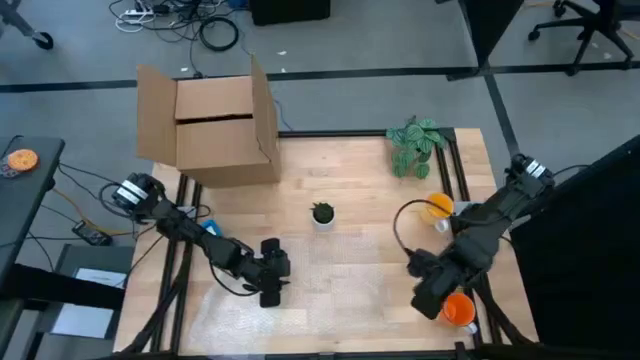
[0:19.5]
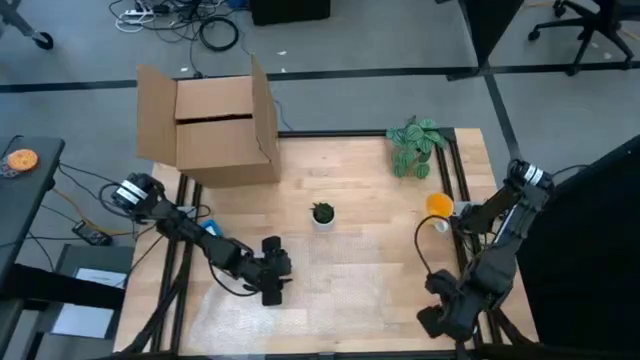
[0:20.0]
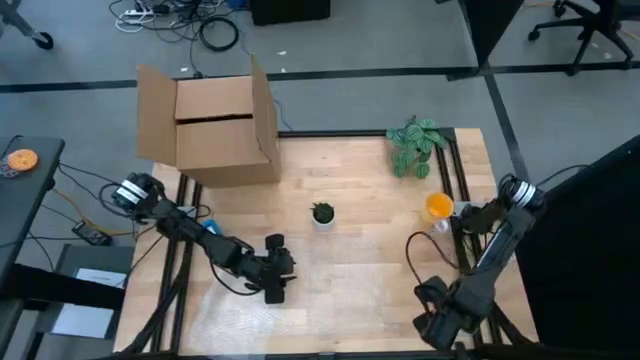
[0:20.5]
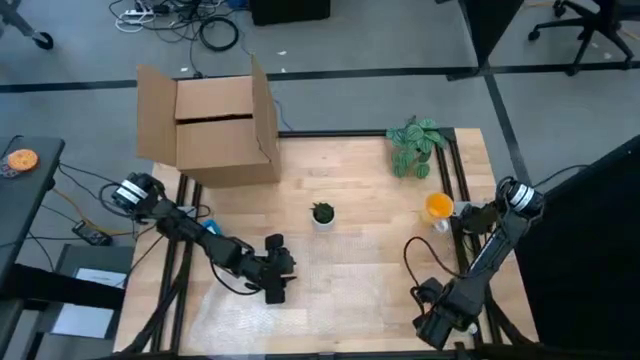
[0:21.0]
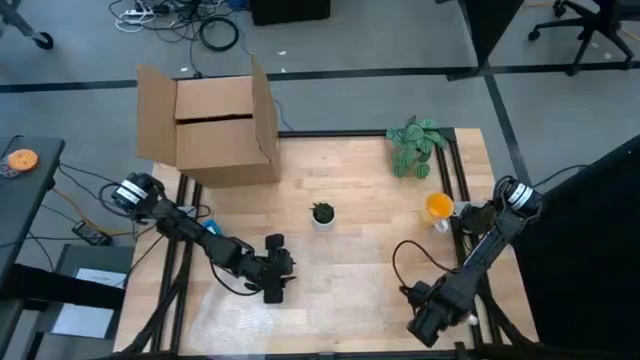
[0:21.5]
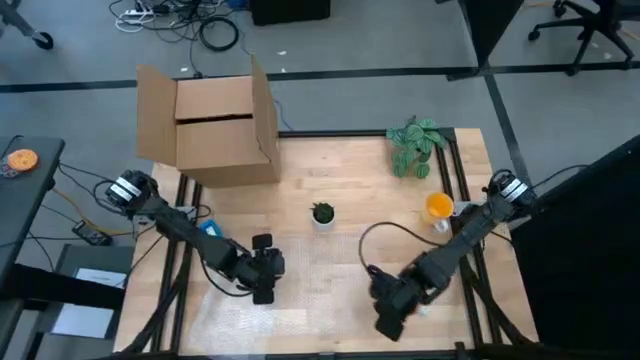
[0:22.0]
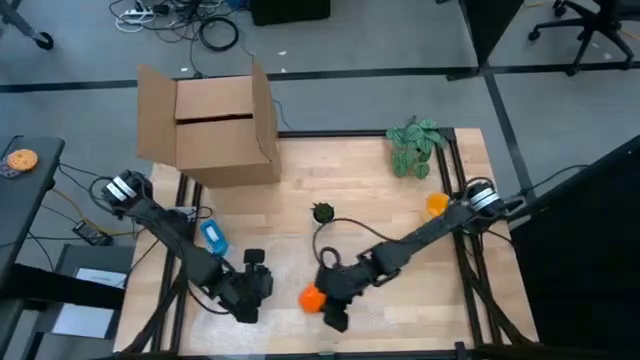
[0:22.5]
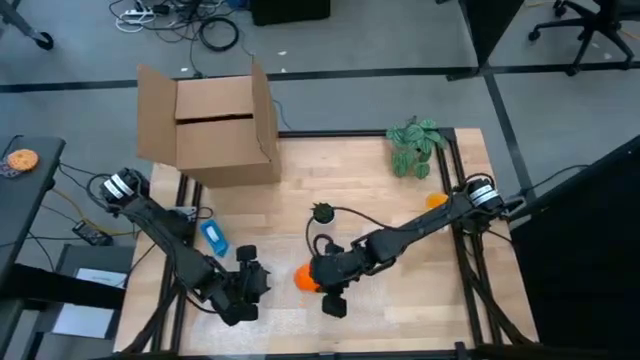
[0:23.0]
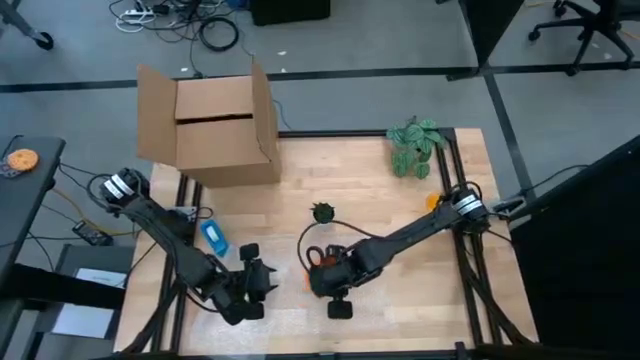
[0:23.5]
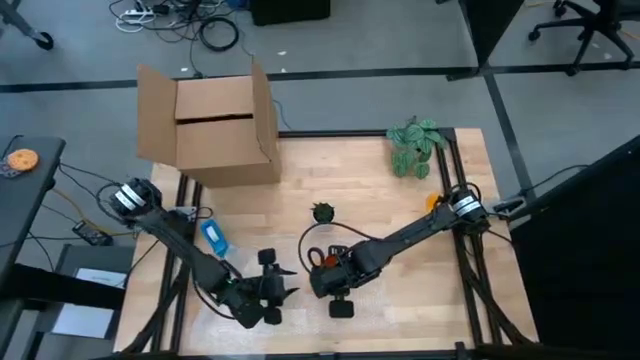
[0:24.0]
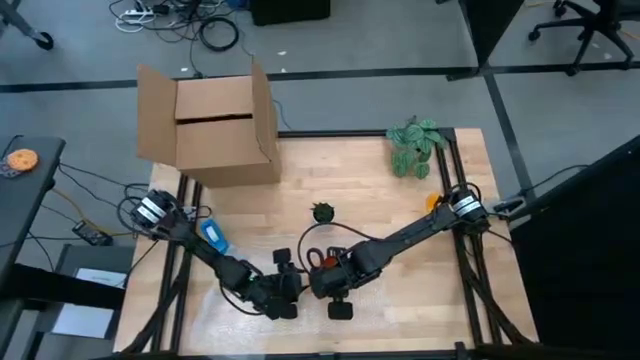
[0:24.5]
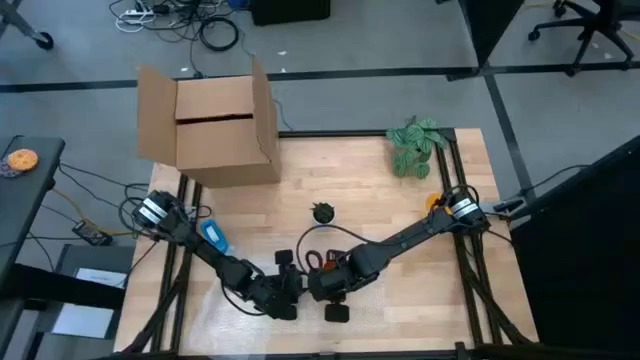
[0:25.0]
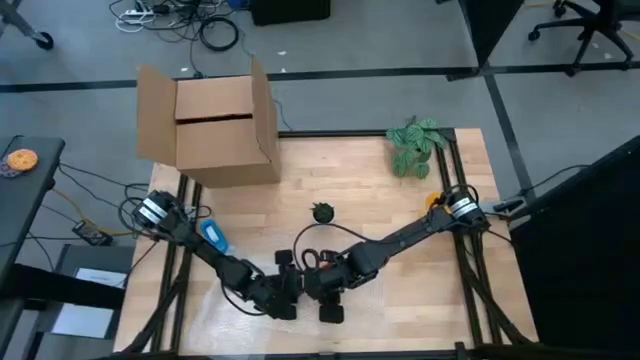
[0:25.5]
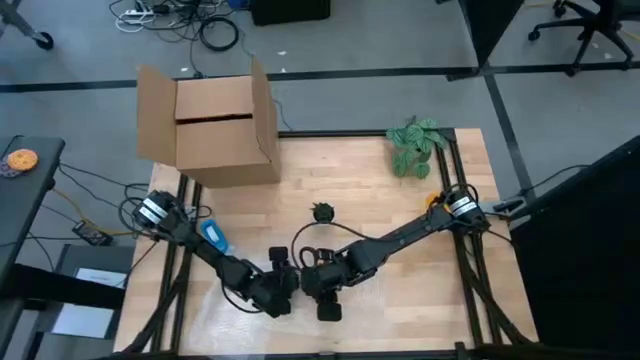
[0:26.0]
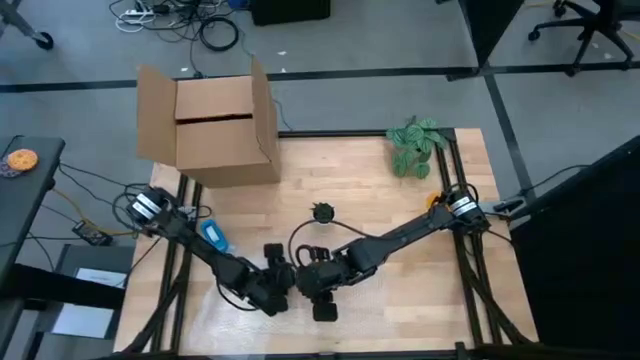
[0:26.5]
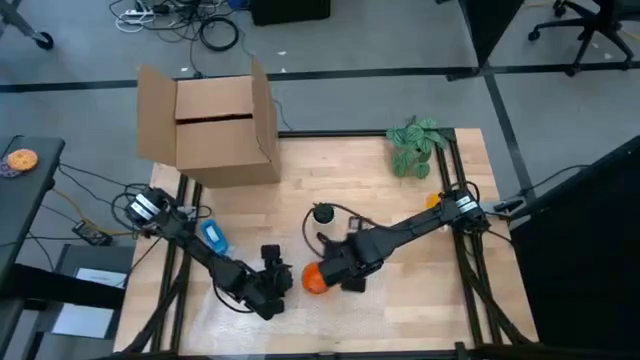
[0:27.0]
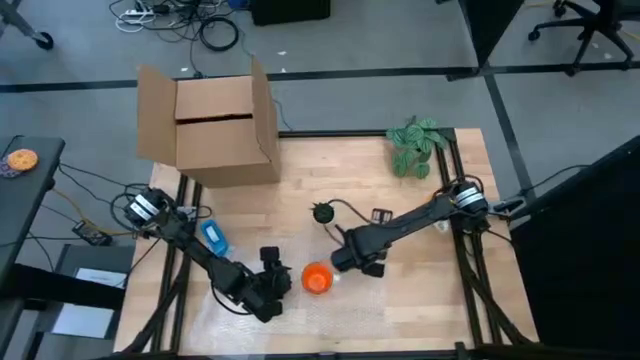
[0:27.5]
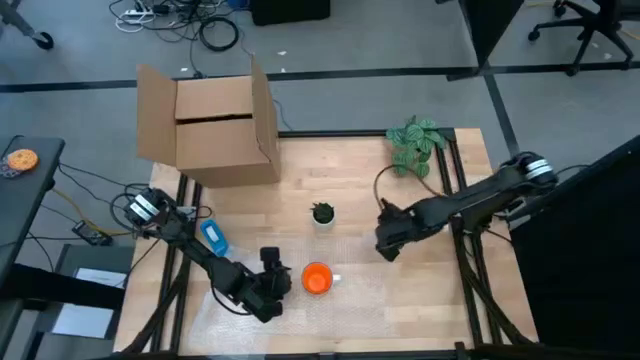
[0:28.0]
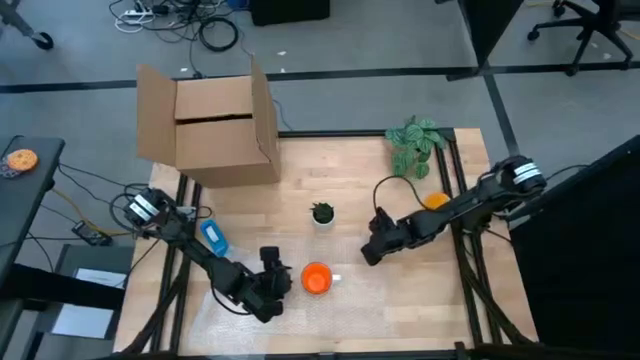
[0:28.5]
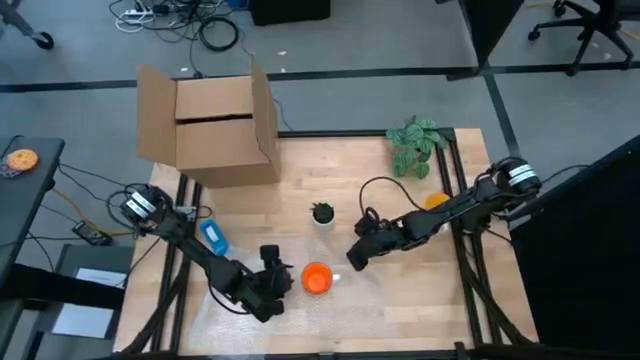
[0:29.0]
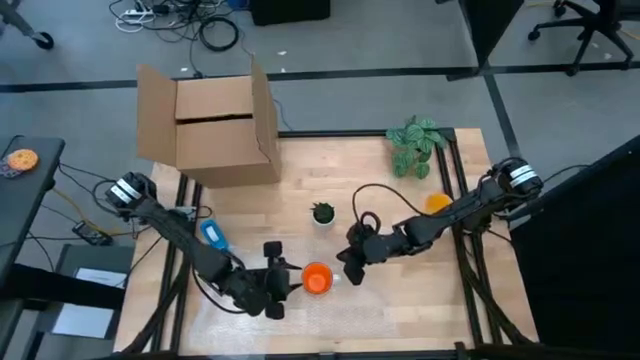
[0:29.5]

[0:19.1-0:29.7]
Task: wrap mug
Wrap the orange mug with the transparent bubble wrap
